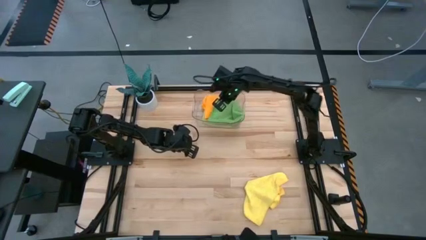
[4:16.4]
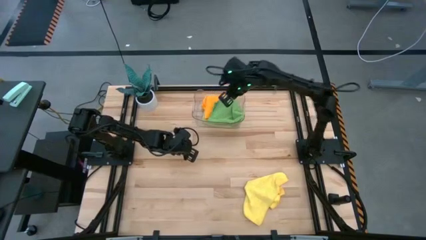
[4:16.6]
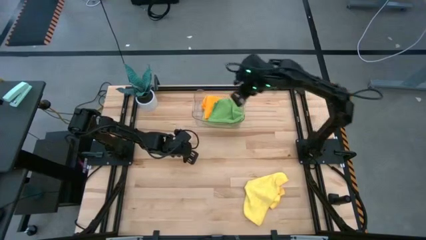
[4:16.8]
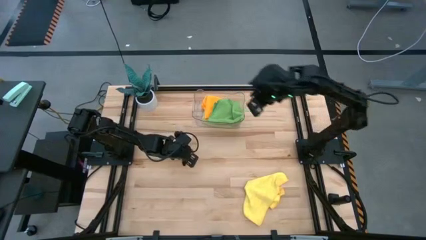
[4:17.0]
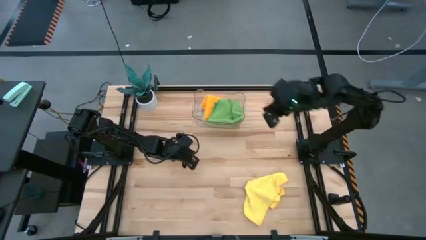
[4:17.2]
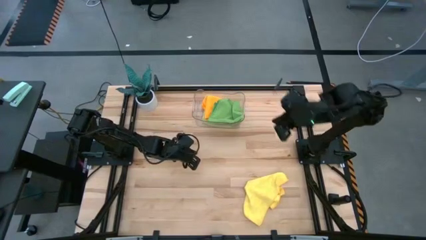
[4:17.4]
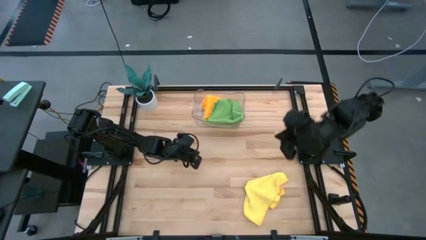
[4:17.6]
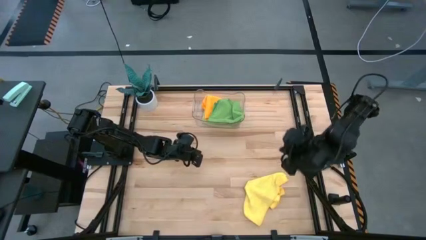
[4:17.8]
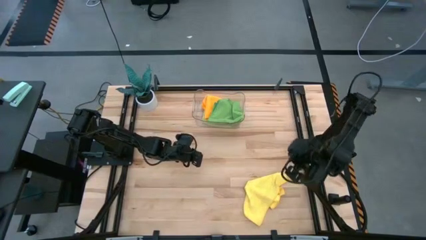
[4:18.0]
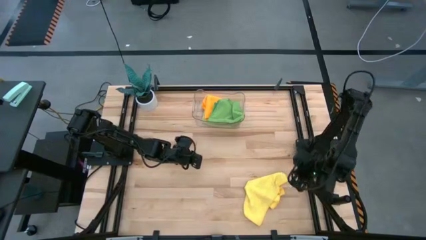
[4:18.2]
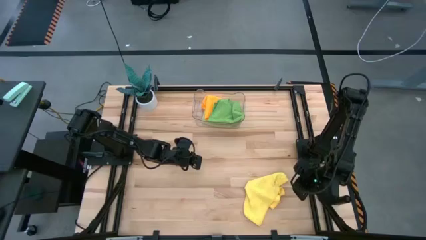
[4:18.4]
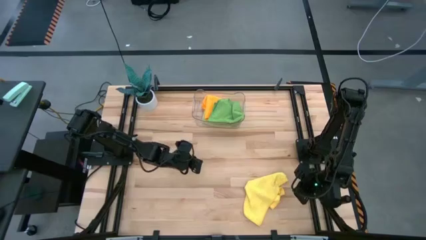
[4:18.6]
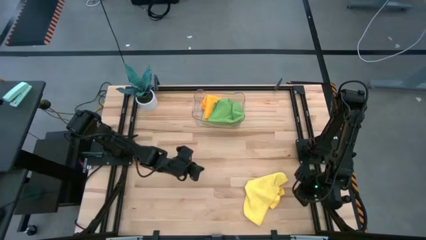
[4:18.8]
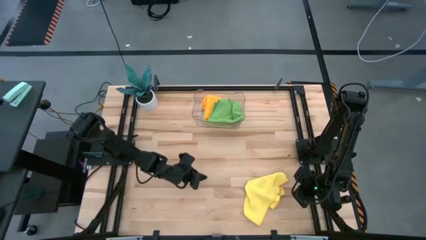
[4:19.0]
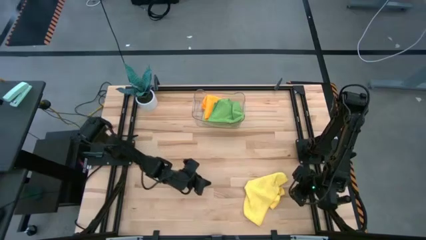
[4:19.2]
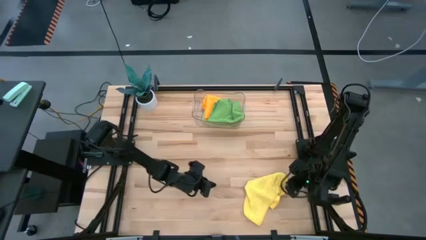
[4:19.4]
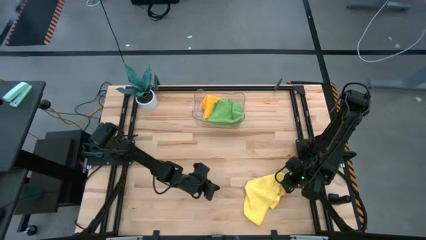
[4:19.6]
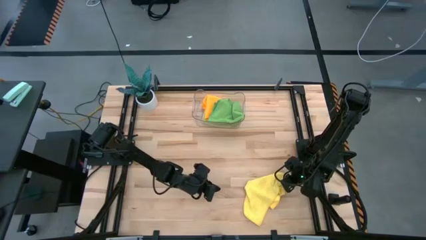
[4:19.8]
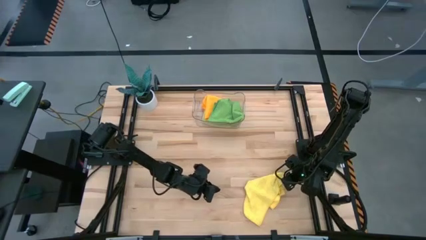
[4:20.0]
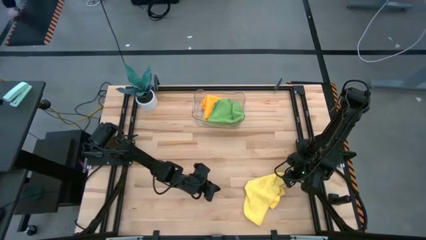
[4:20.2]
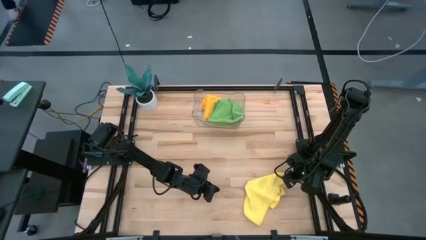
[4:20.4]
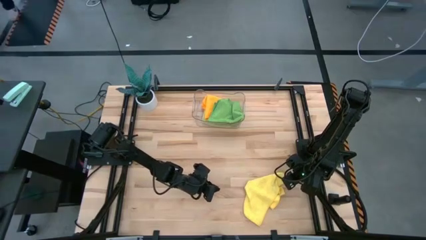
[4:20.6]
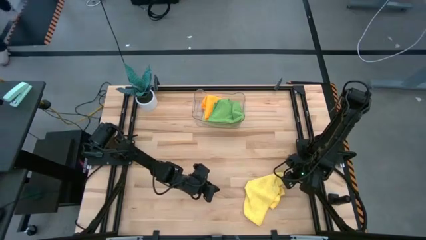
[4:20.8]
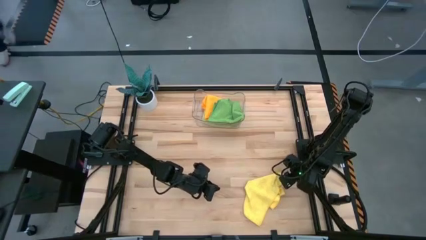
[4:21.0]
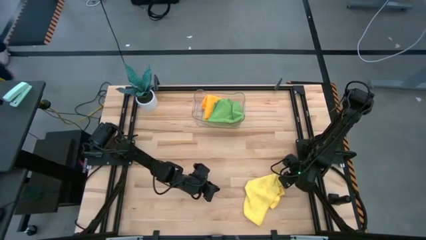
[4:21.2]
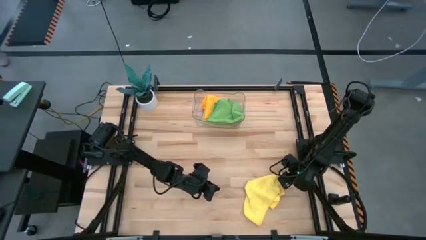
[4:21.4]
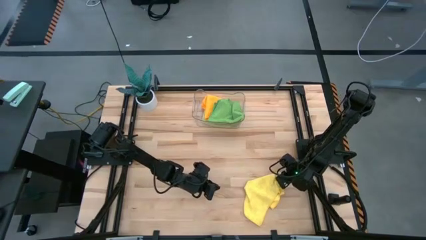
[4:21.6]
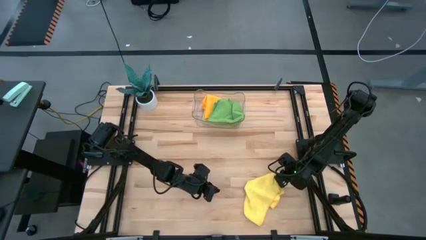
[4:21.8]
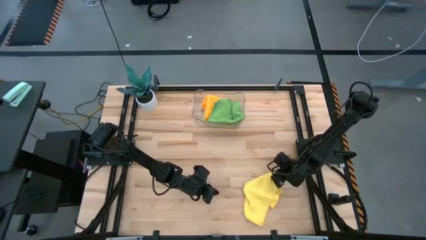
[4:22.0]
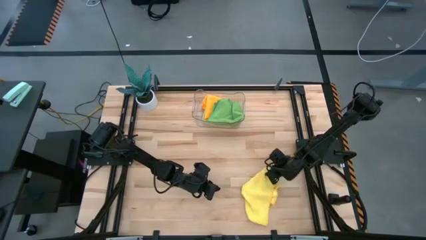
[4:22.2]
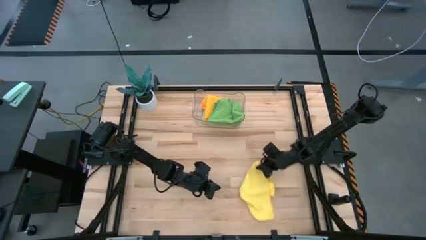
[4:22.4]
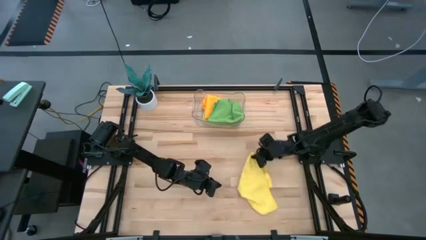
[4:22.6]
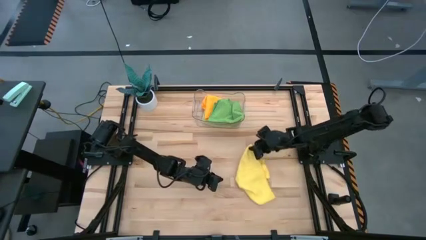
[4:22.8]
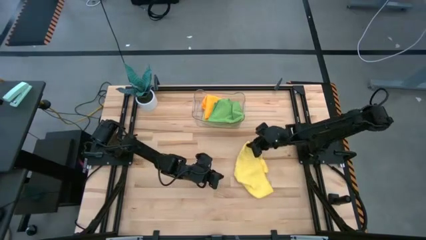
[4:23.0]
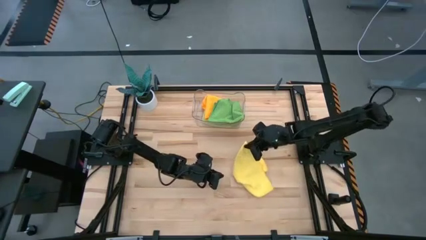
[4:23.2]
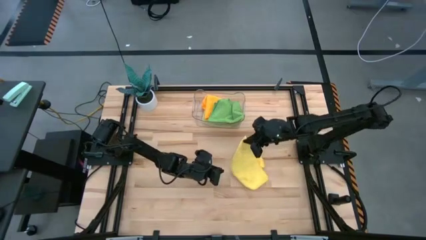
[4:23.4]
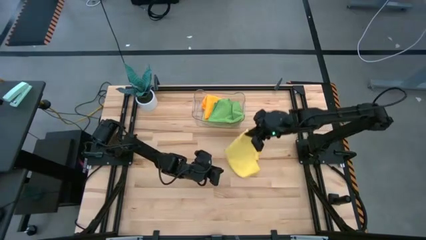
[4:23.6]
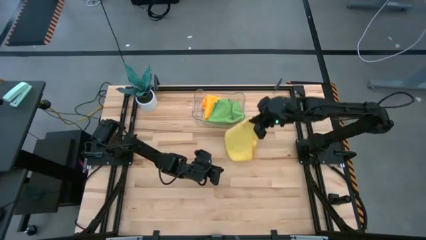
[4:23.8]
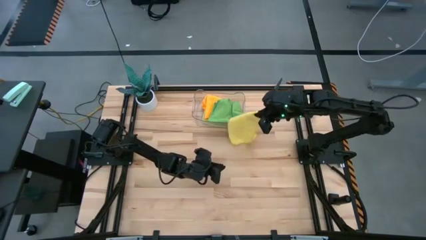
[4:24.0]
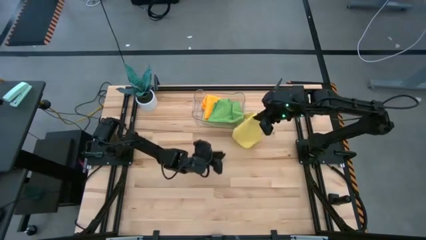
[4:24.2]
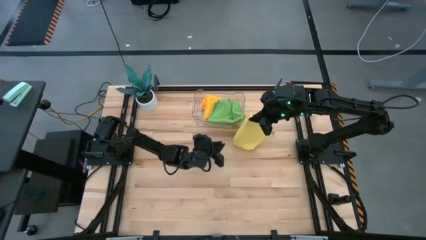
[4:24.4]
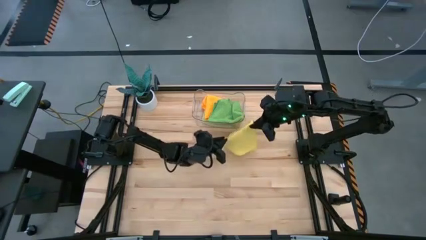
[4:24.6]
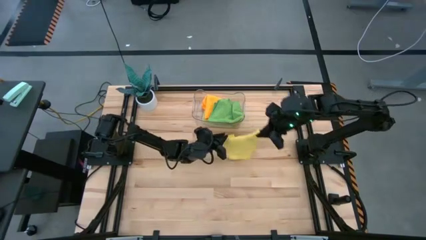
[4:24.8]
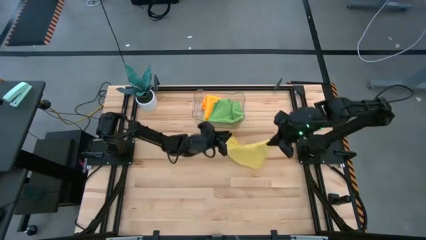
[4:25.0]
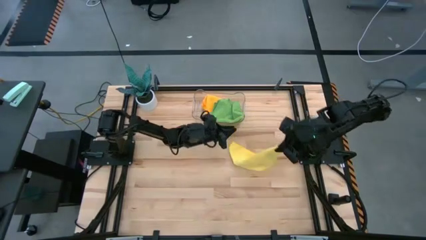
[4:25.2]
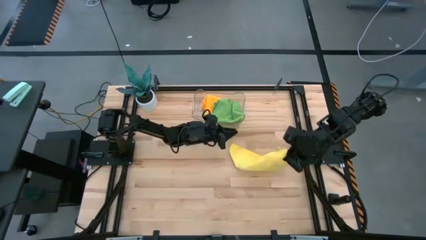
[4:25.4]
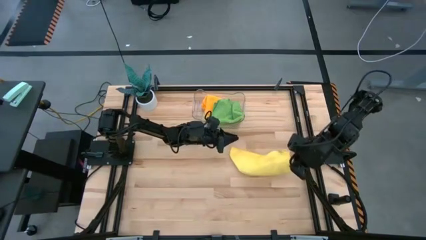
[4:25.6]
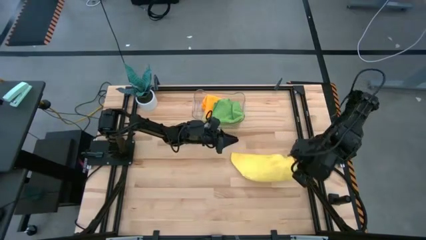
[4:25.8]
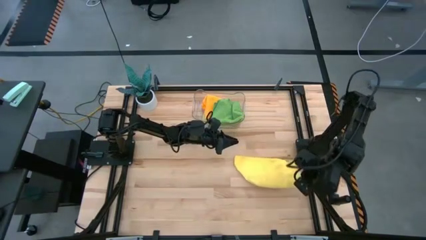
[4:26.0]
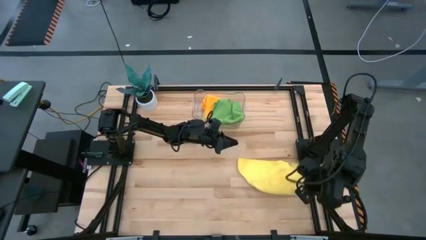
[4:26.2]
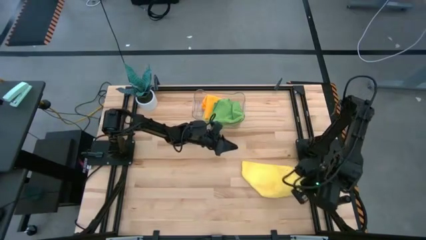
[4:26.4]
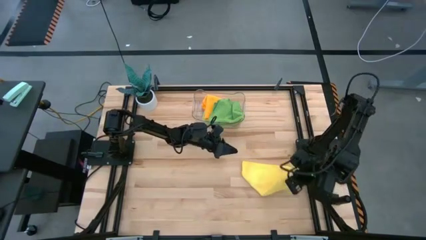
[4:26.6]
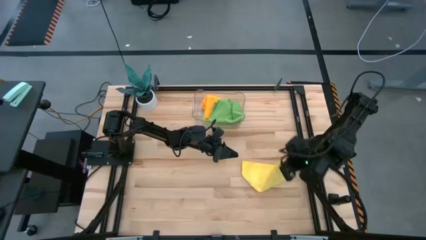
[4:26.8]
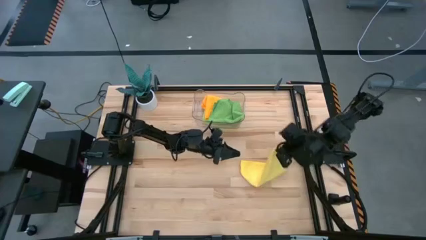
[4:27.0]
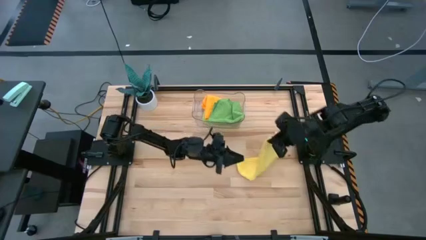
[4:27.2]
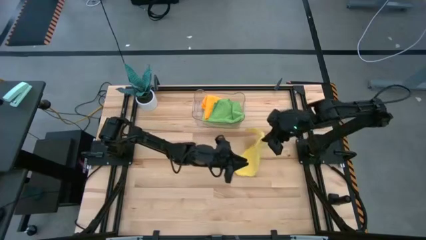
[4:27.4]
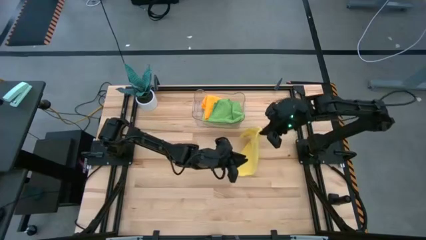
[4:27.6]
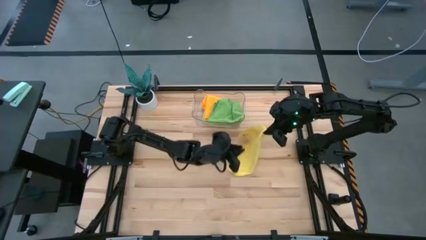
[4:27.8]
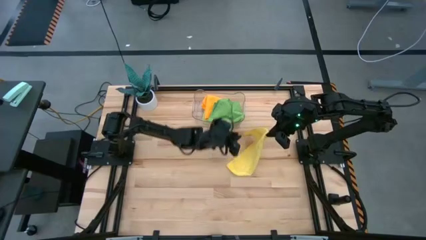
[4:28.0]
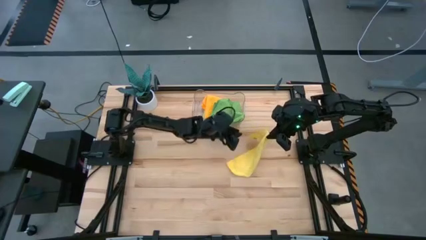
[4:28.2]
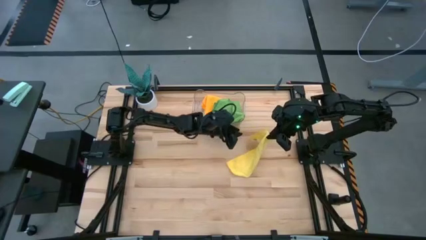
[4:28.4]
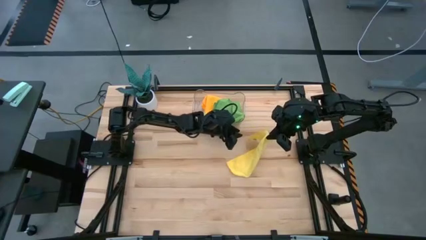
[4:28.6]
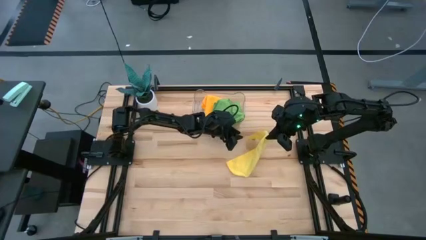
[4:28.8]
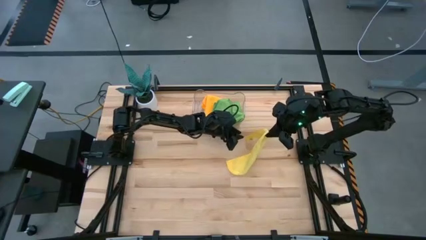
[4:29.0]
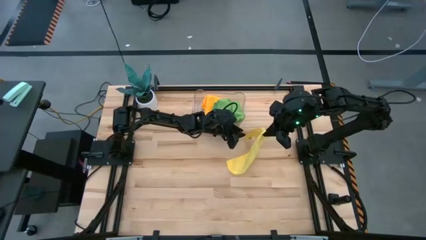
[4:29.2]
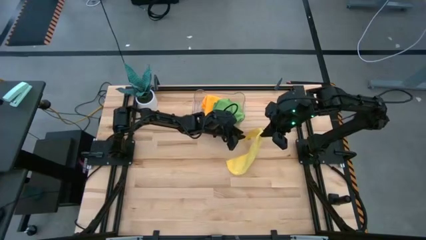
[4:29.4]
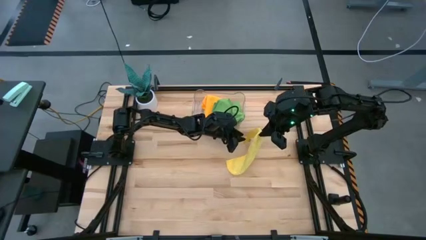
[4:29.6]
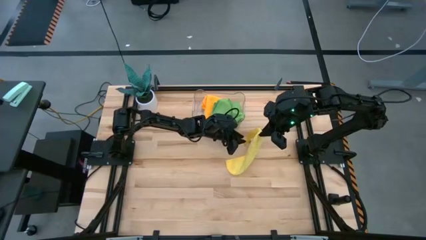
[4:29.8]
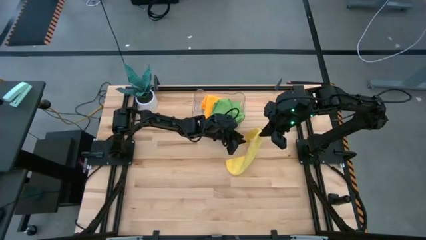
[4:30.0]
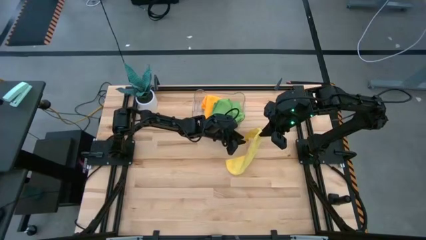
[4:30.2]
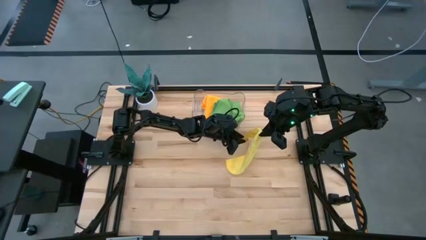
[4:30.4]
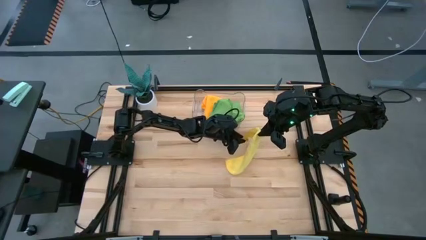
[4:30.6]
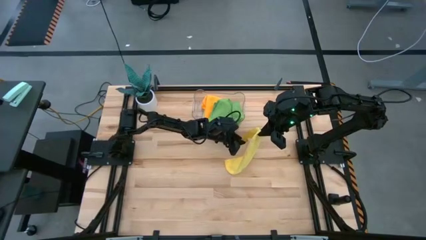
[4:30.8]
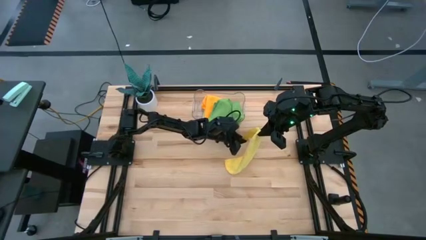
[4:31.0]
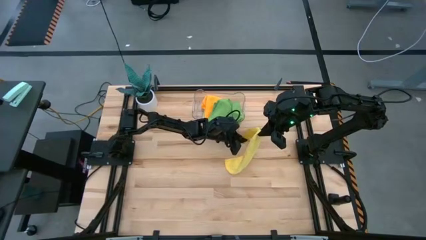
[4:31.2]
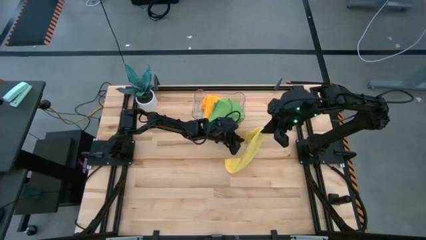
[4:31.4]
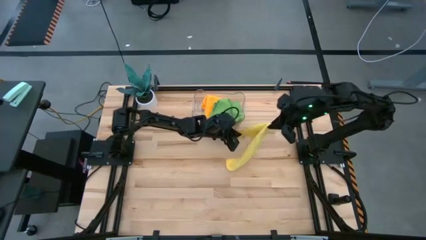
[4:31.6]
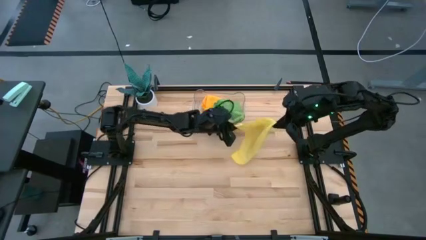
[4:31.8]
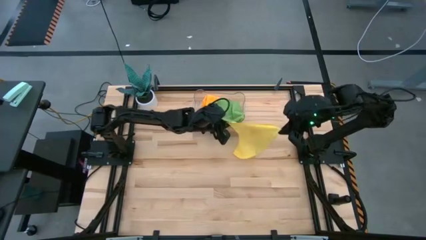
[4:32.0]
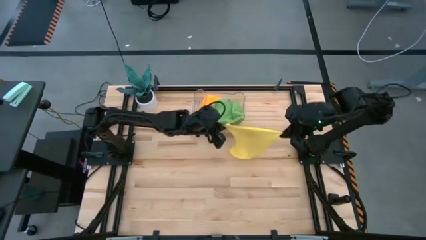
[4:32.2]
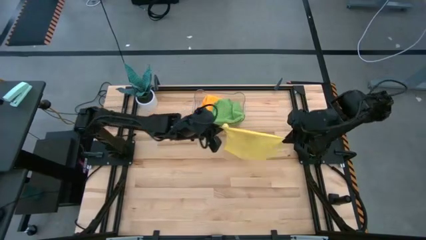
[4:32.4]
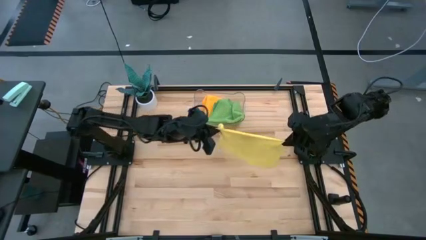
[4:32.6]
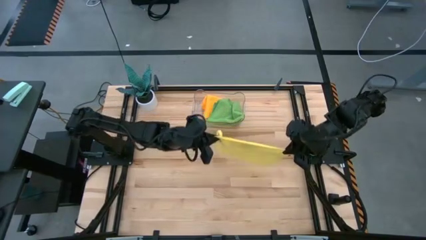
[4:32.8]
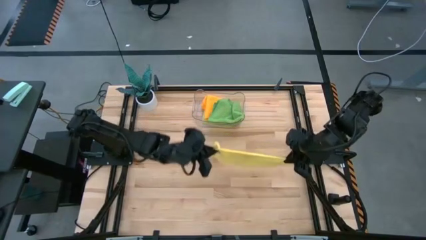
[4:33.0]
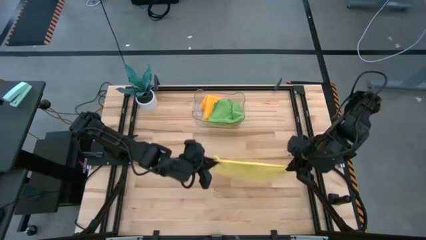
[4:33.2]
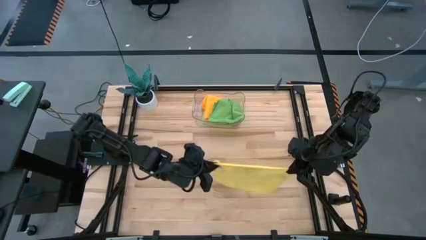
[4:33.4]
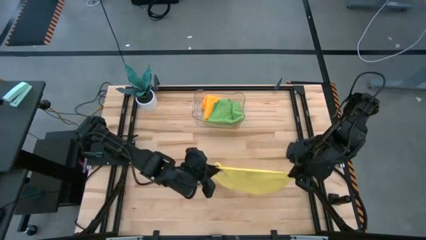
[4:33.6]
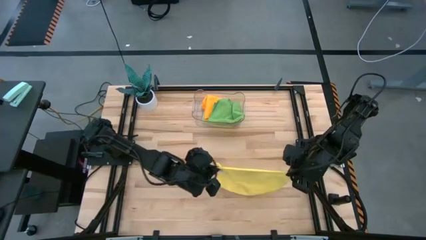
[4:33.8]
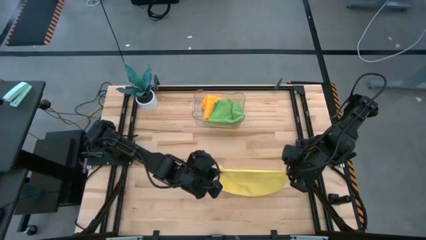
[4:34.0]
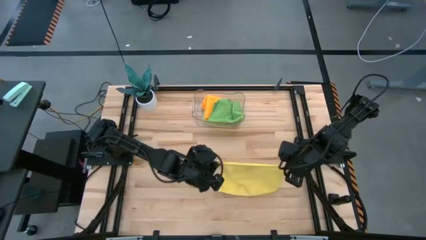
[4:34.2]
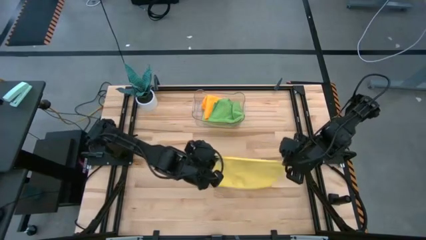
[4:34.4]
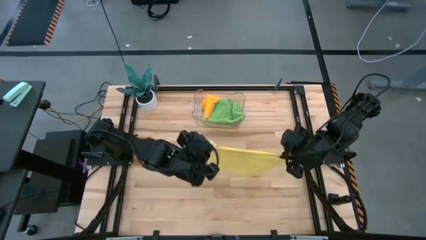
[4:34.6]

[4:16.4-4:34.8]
Task: Fold microfiber towels
Fold the yellow microfiber cloth
